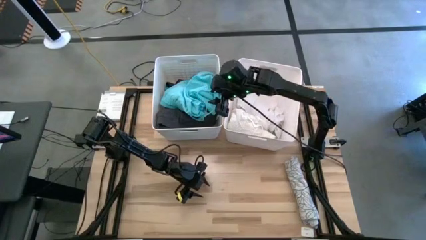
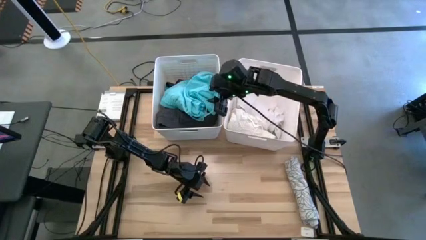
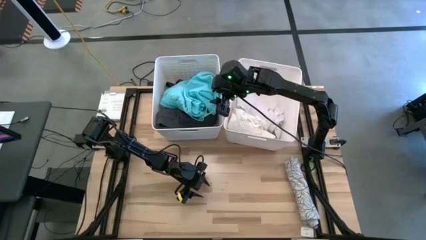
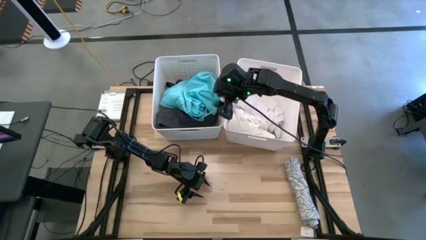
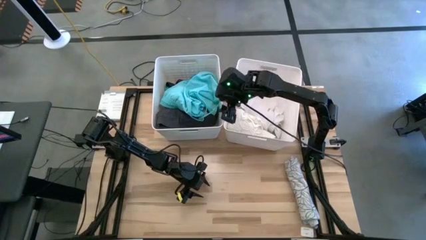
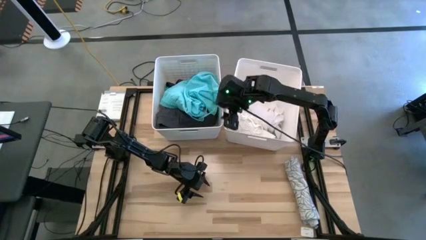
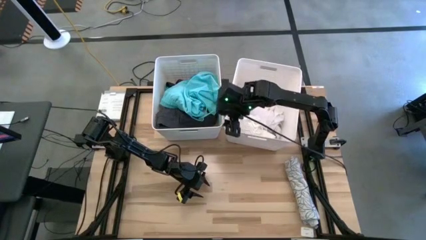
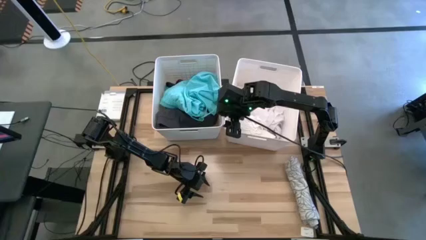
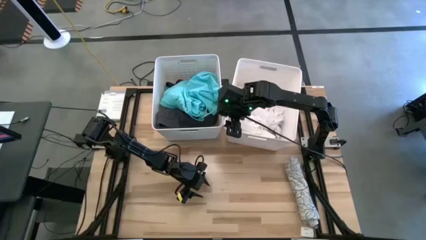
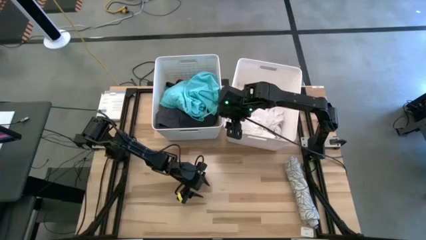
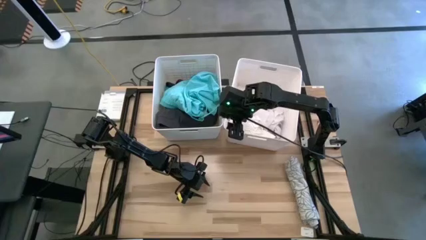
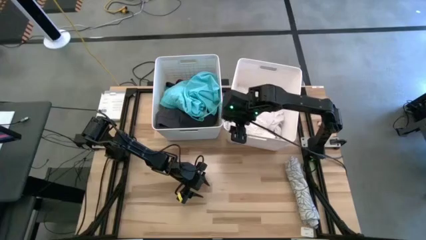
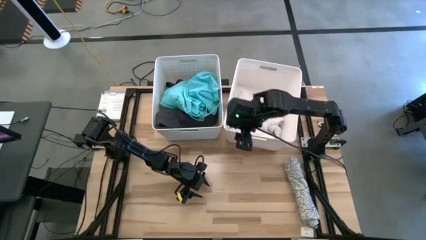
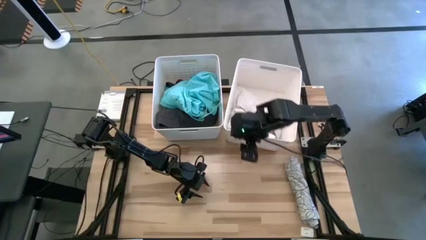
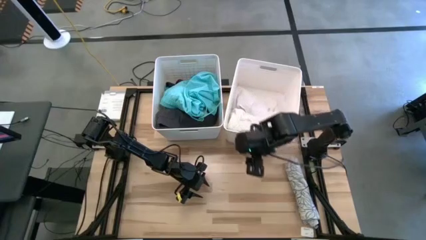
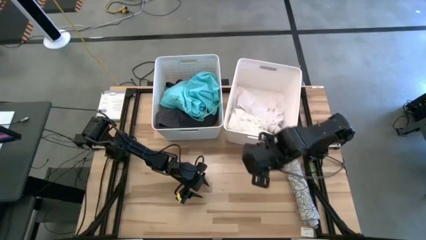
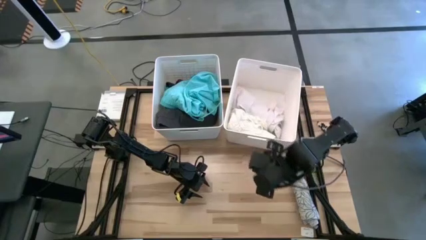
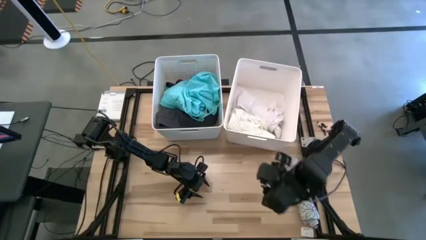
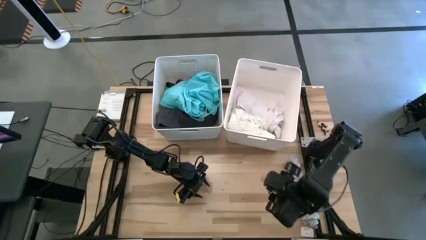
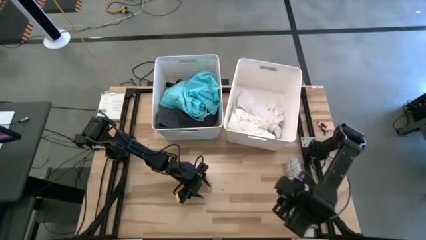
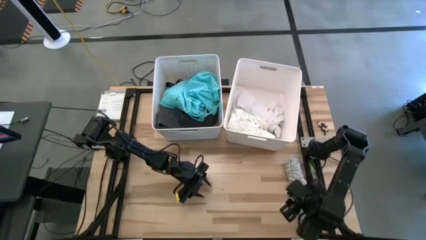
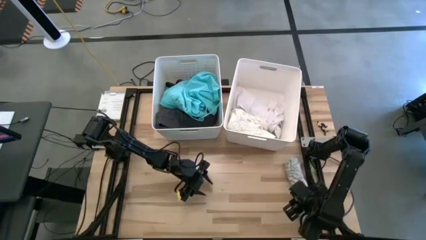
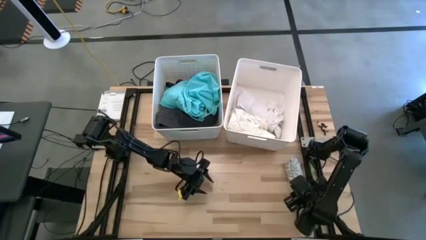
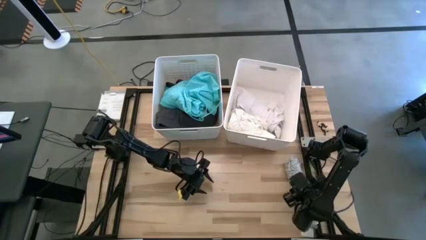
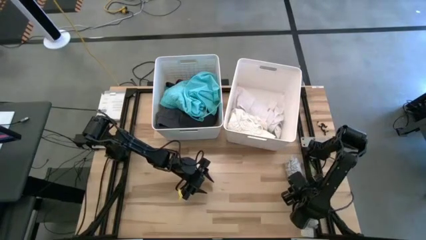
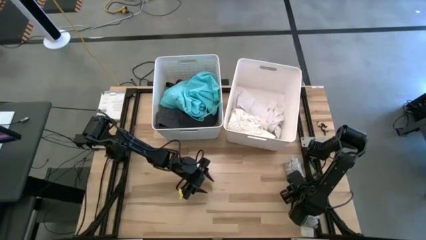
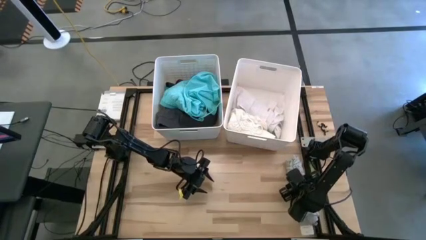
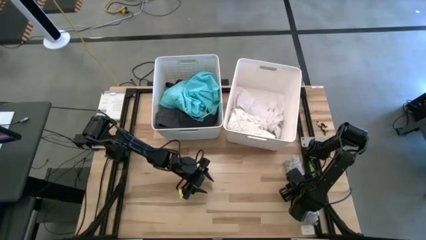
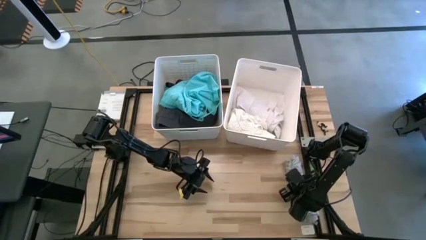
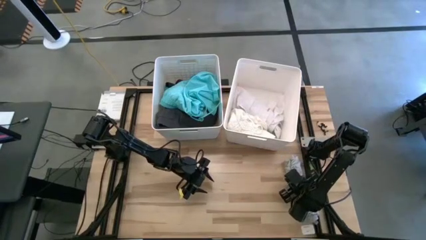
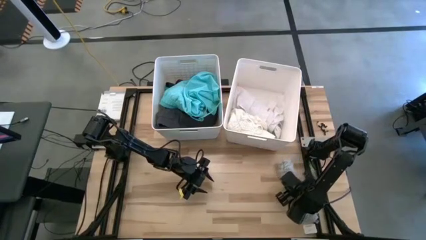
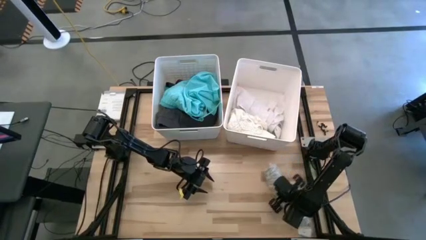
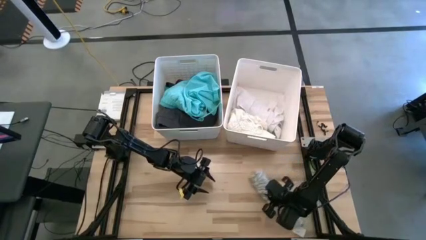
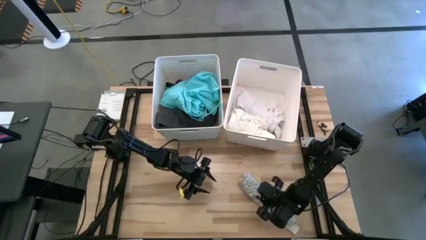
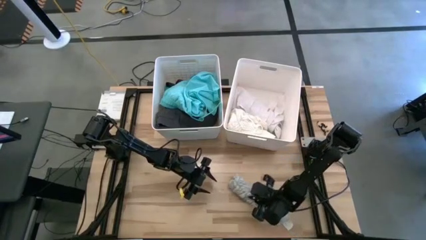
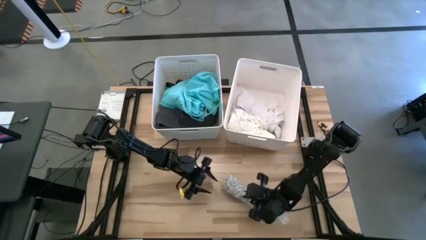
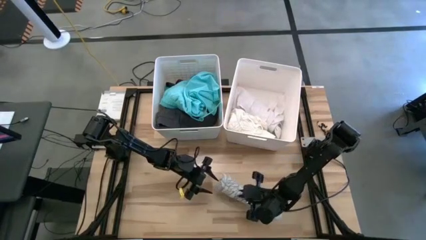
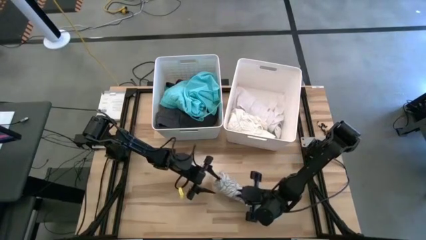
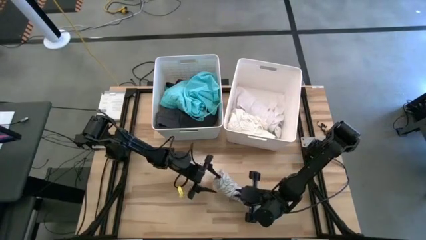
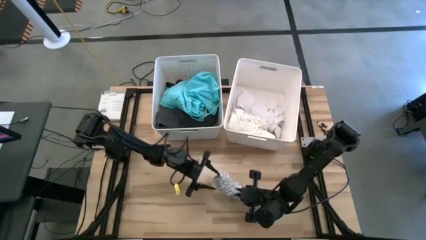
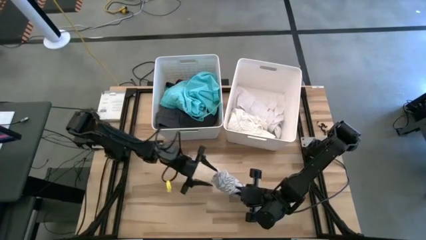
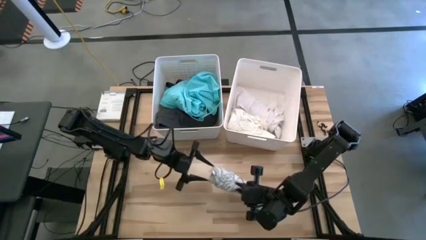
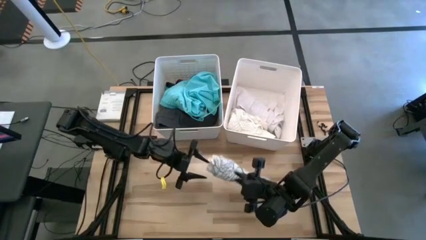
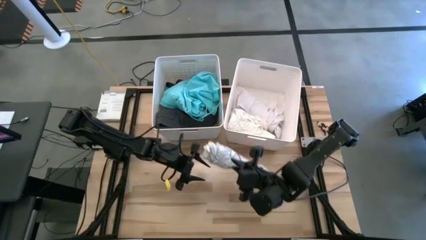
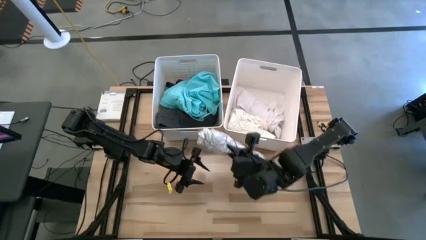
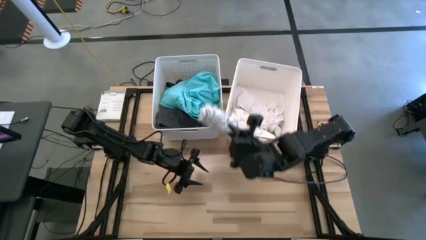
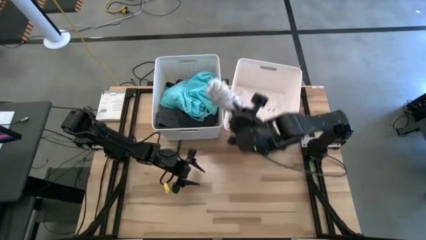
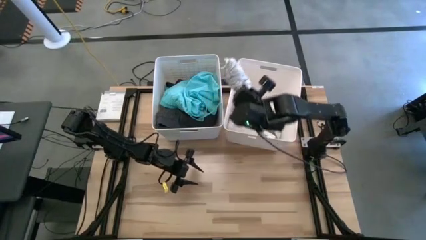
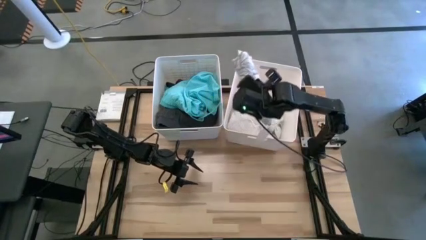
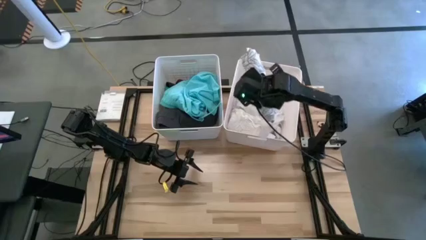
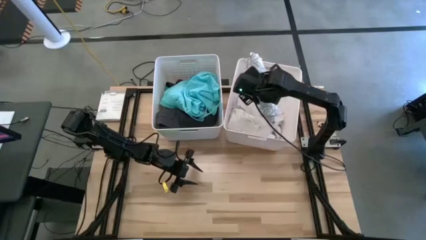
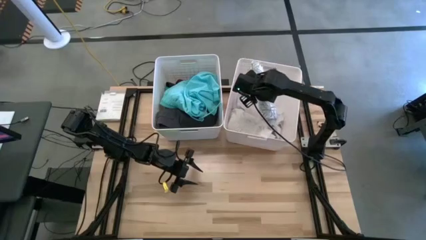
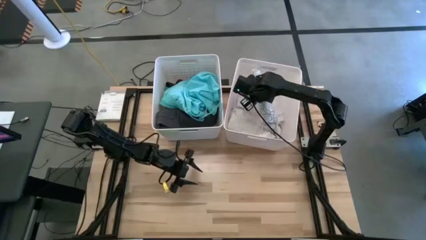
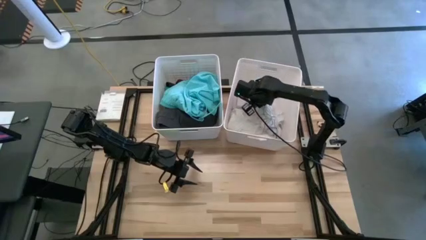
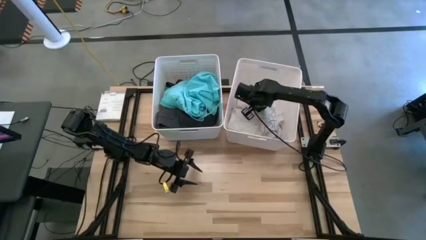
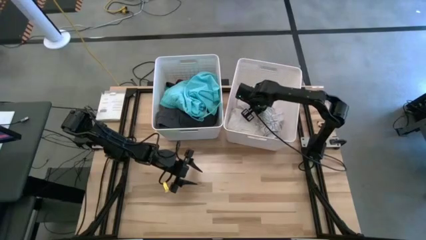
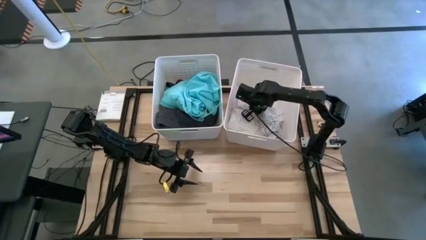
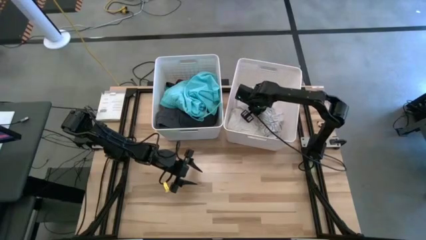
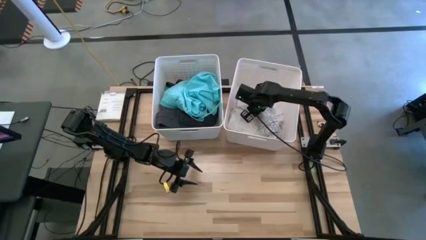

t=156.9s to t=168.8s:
Task: Sort clothes
Put the rolled white shirt into the right white bin
